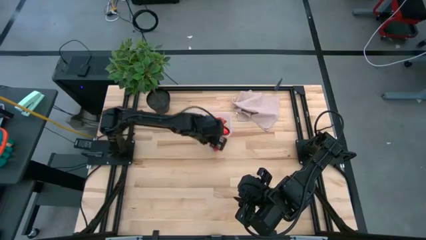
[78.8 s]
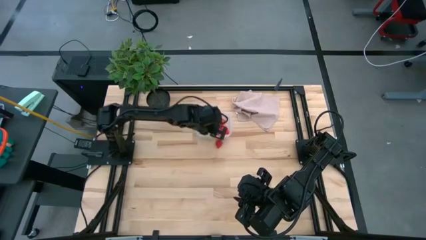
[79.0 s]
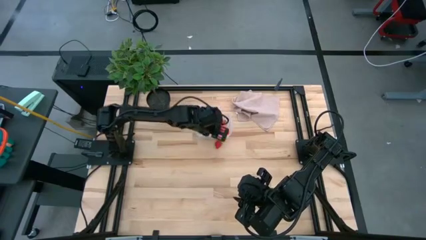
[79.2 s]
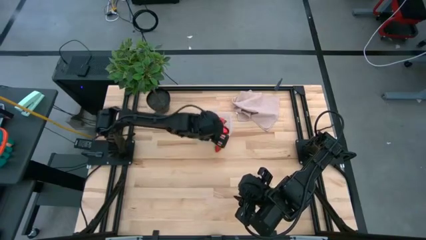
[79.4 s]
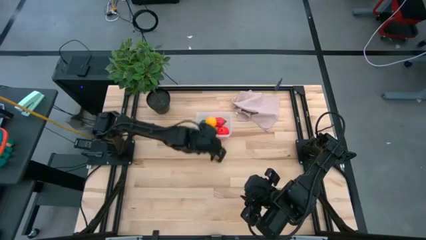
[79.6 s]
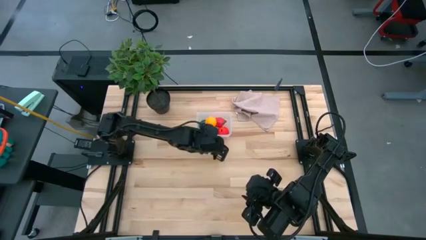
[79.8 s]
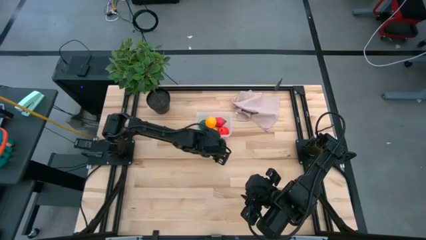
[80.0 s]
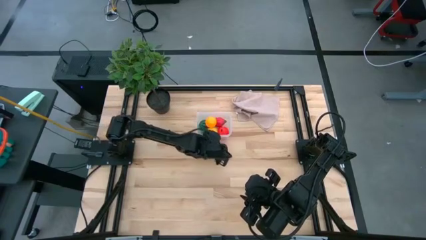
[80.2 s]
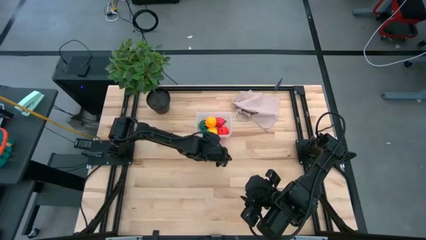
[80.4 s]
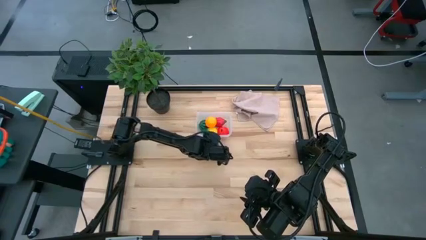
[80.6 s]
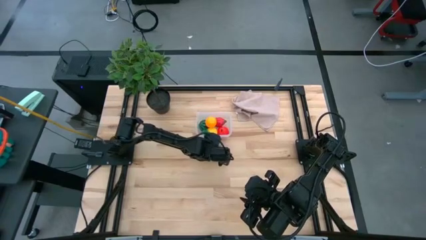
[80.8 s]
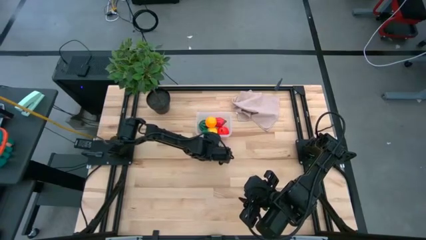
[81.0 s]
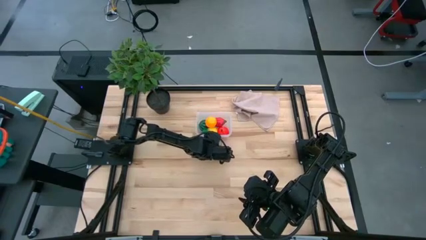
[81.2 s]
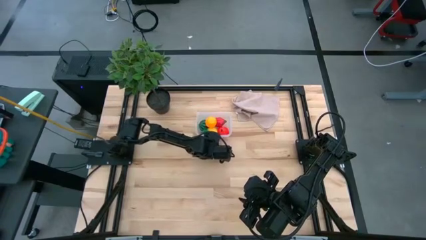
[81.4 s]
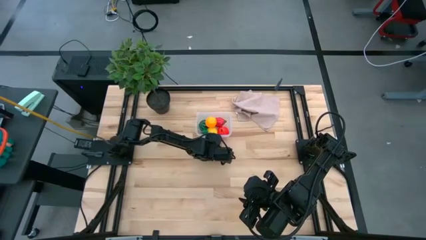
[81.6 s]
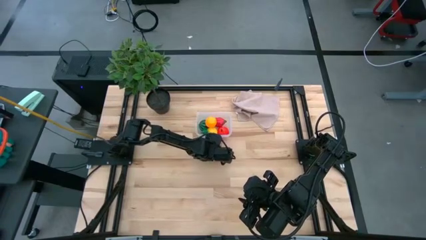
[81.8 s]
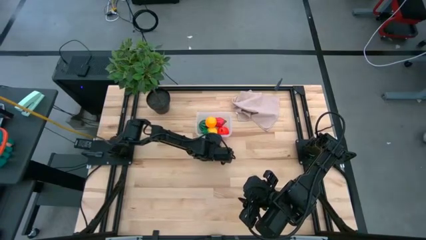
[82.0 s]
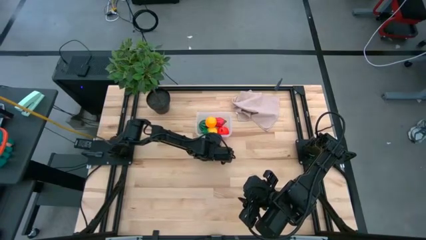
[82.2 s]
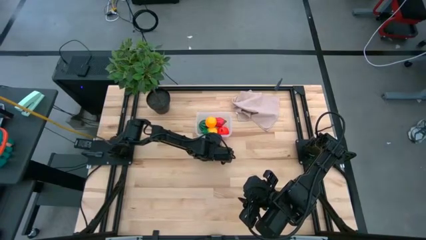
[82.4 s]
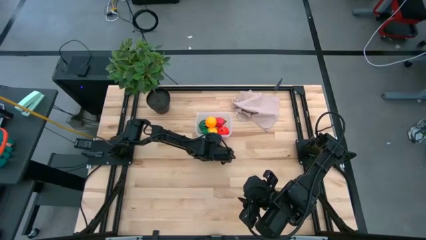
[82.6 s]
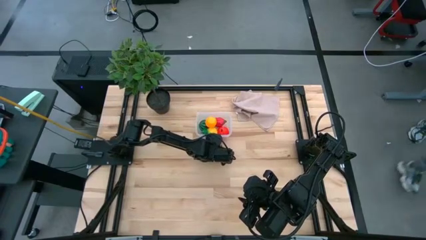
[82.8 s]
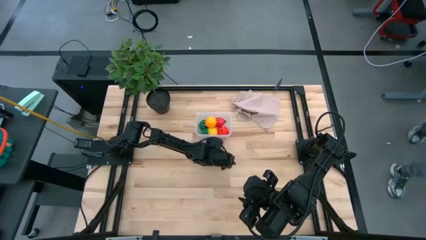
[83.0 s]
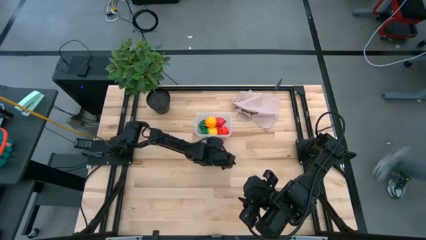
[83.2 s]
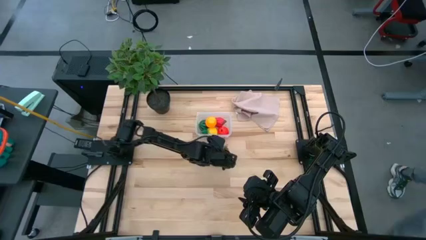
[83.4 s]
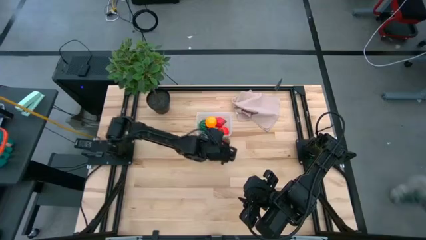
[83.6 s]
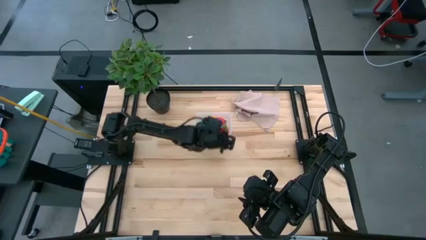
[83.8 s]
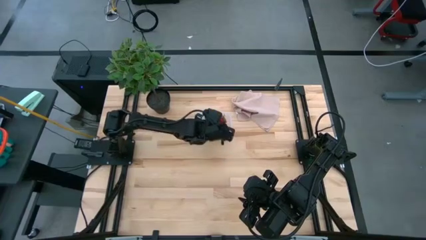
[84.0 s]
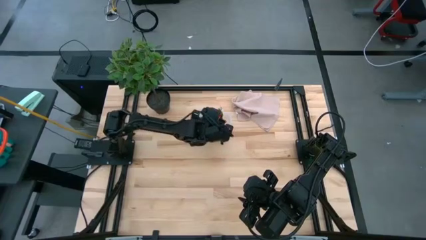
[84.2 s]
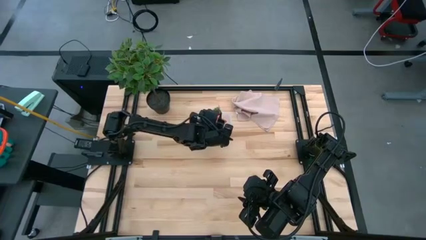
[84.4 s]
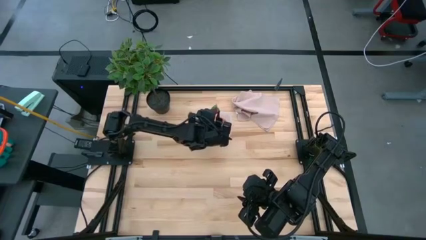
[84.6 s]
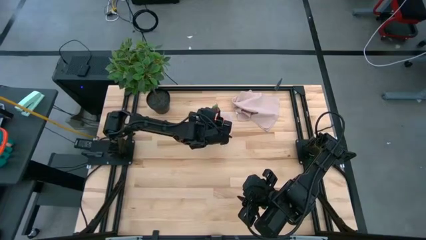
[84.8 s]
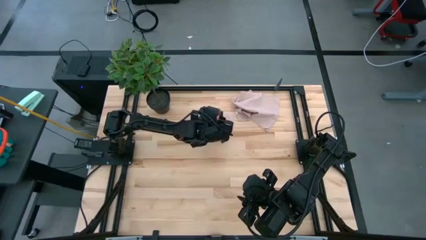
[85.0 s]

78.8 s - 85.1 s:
Task: Pick and placing Produce into tupperware
Put the red strawberry into the transparent container

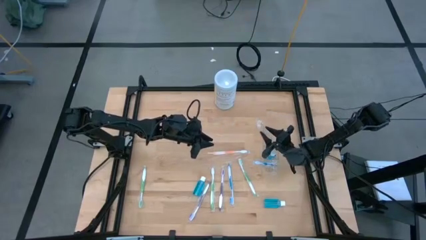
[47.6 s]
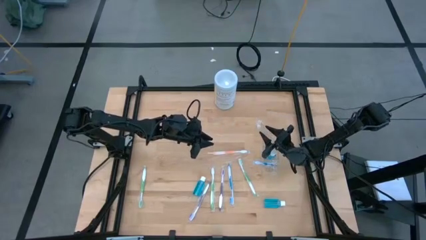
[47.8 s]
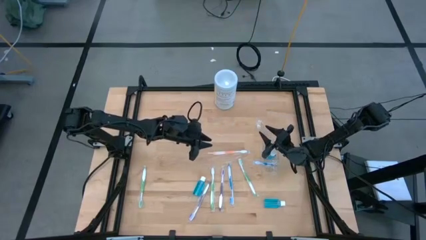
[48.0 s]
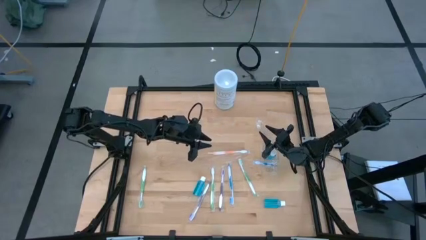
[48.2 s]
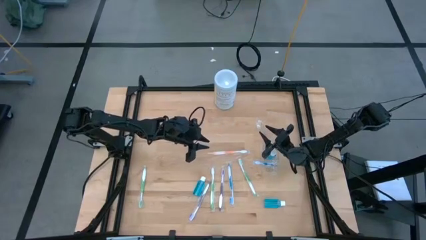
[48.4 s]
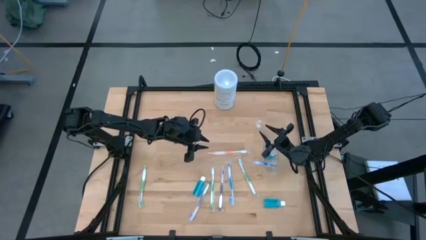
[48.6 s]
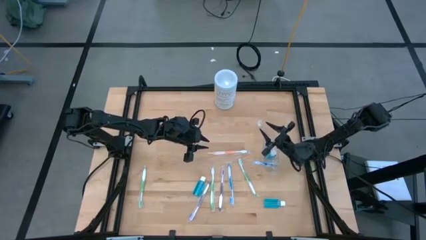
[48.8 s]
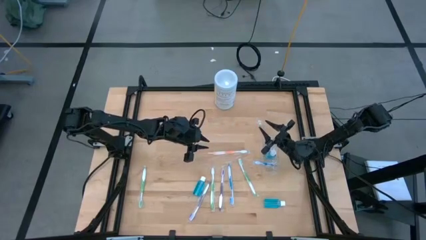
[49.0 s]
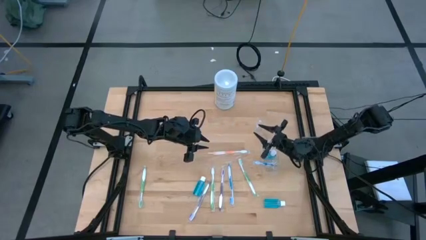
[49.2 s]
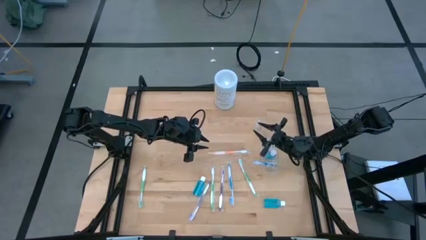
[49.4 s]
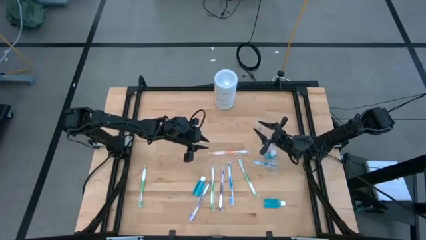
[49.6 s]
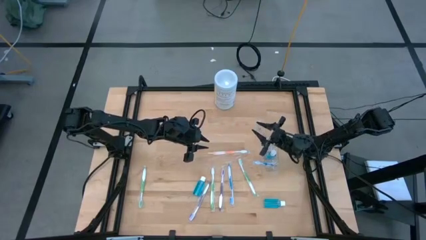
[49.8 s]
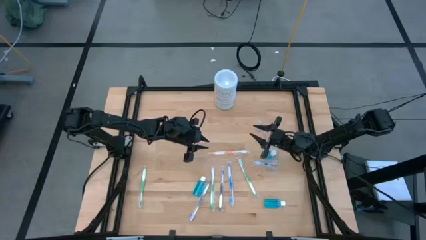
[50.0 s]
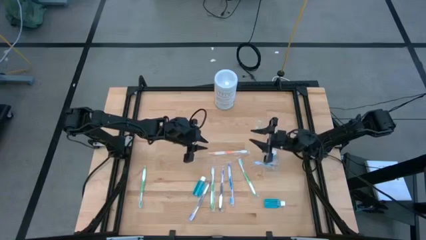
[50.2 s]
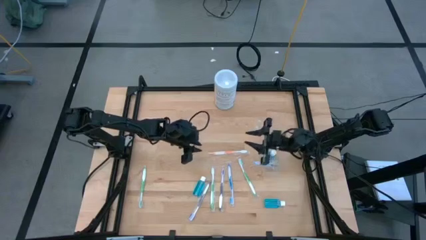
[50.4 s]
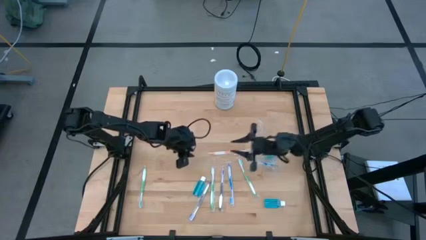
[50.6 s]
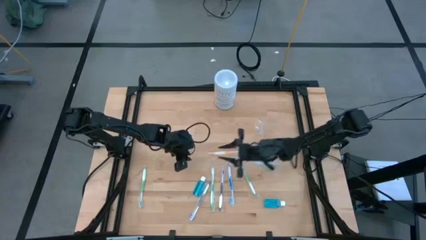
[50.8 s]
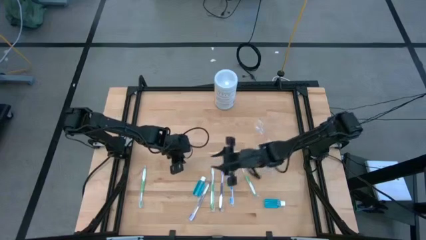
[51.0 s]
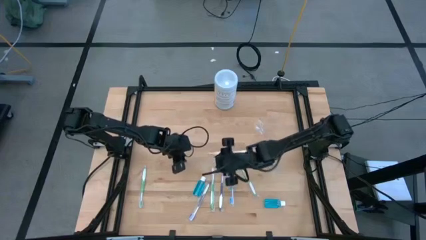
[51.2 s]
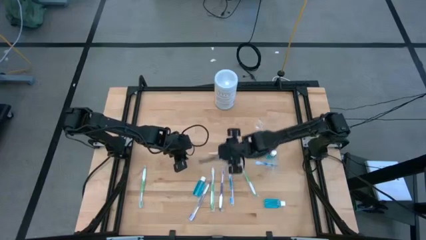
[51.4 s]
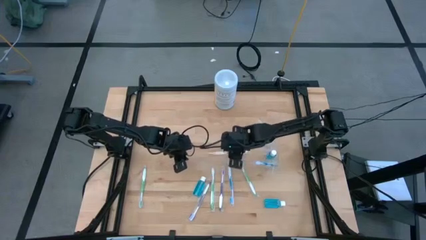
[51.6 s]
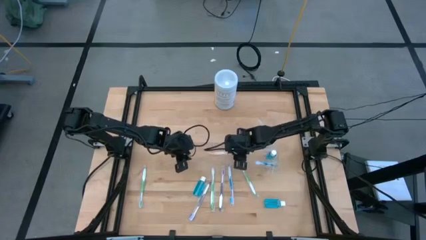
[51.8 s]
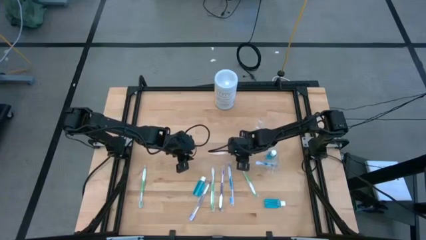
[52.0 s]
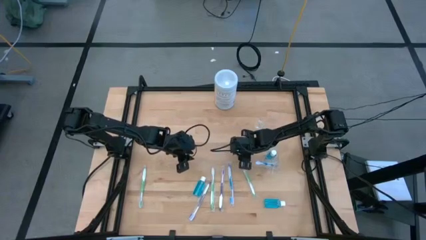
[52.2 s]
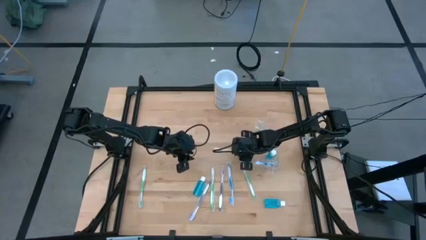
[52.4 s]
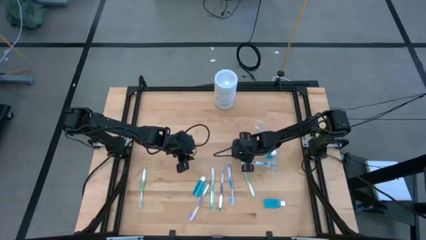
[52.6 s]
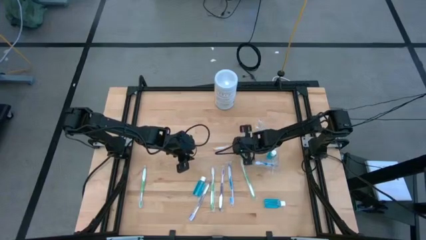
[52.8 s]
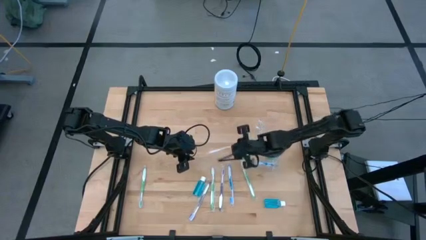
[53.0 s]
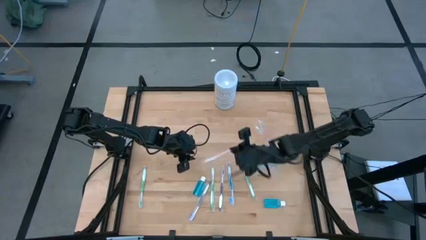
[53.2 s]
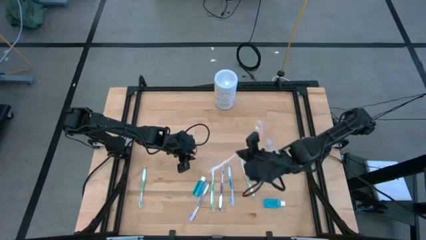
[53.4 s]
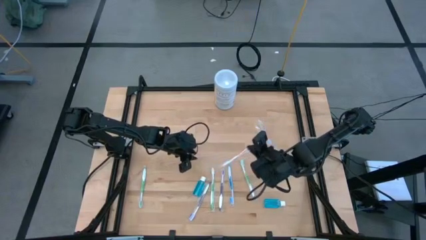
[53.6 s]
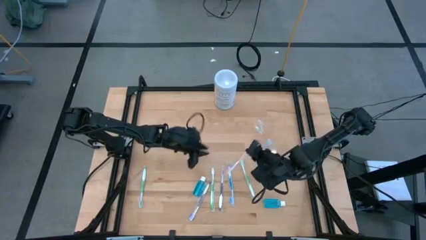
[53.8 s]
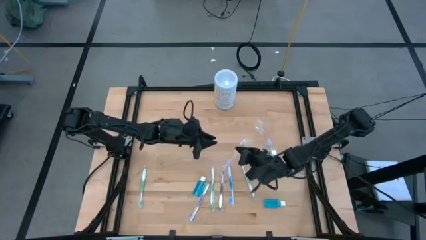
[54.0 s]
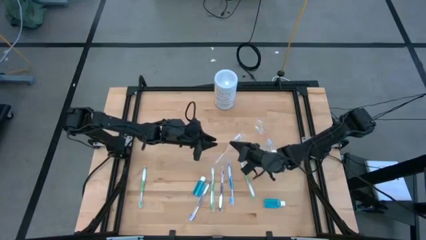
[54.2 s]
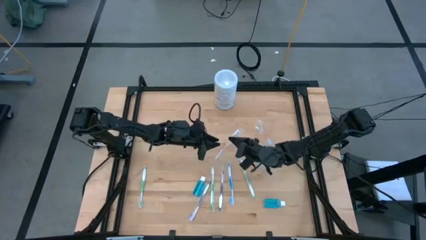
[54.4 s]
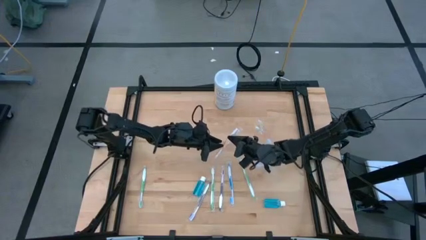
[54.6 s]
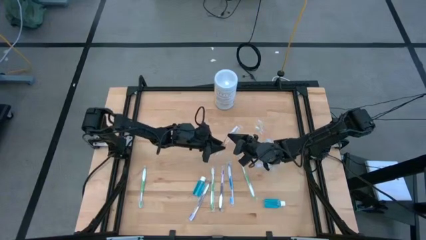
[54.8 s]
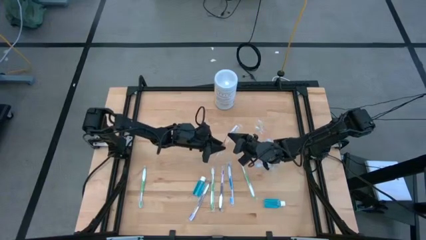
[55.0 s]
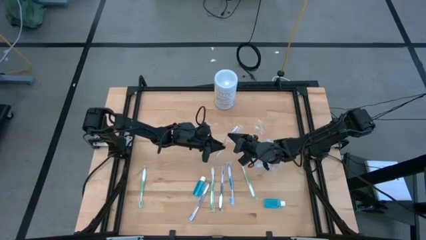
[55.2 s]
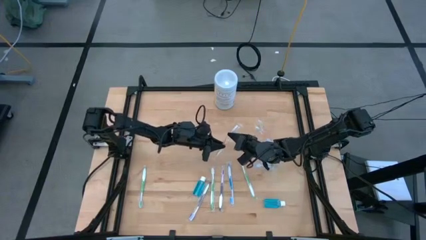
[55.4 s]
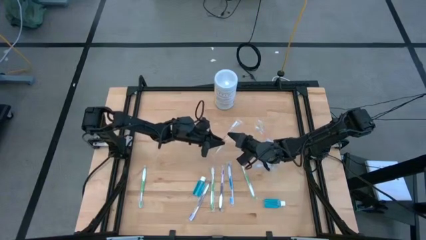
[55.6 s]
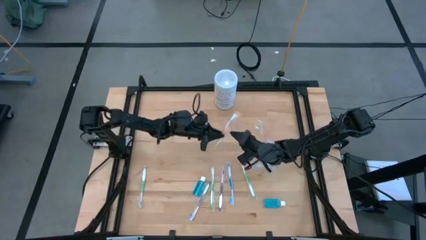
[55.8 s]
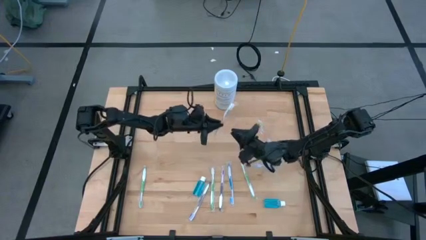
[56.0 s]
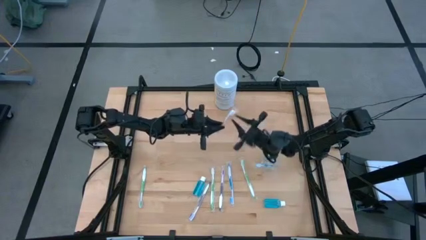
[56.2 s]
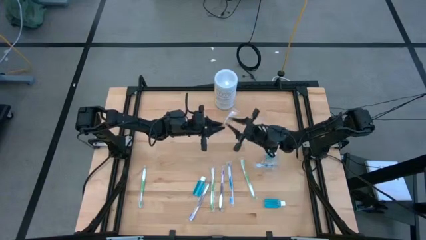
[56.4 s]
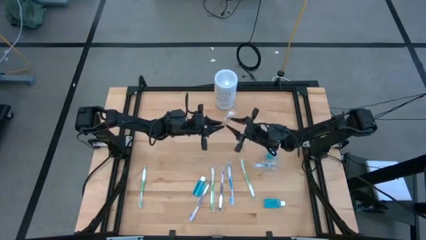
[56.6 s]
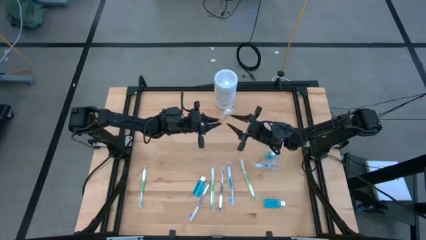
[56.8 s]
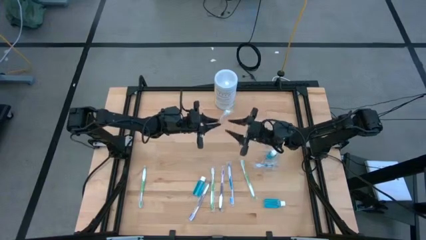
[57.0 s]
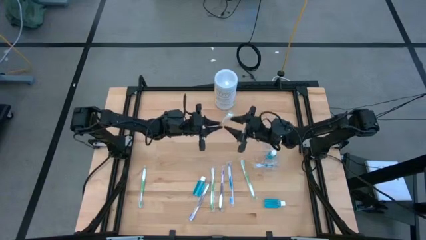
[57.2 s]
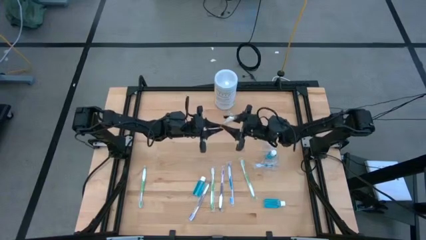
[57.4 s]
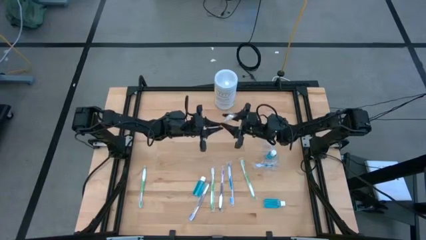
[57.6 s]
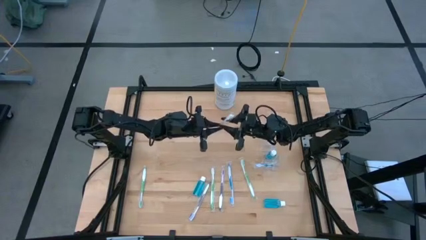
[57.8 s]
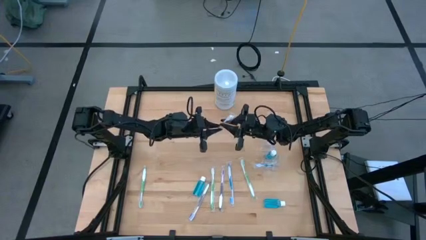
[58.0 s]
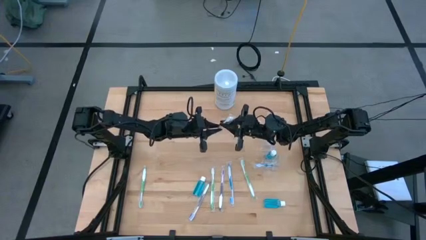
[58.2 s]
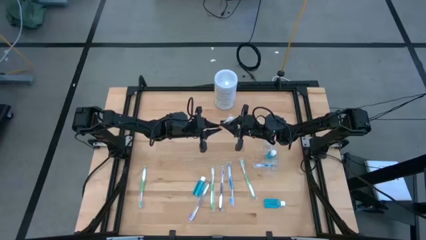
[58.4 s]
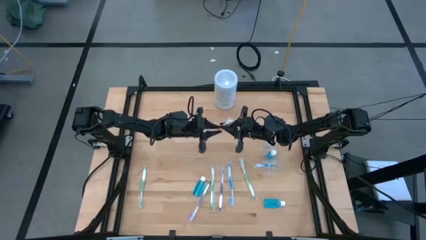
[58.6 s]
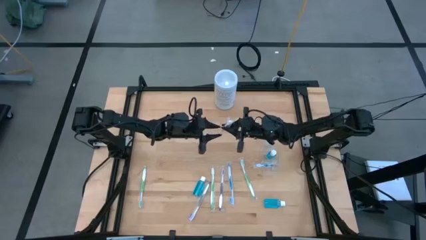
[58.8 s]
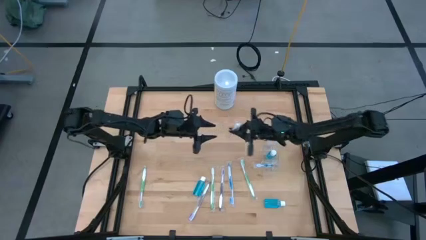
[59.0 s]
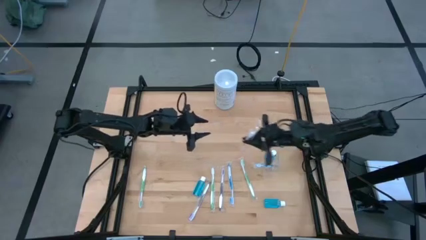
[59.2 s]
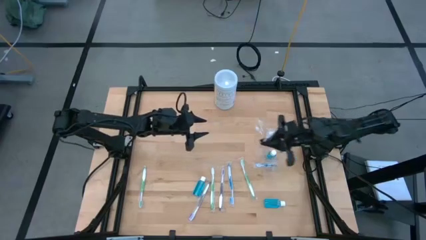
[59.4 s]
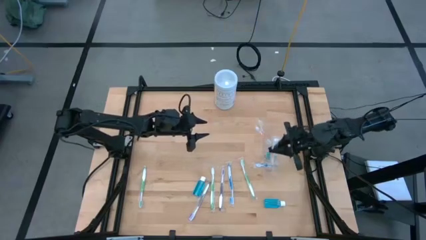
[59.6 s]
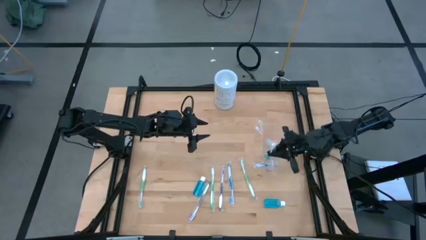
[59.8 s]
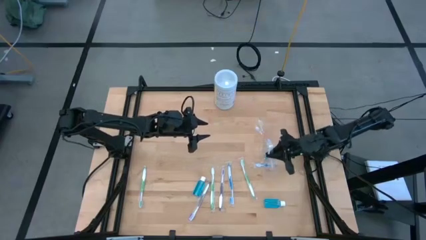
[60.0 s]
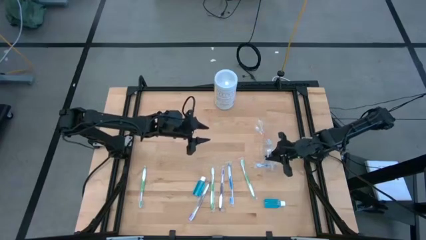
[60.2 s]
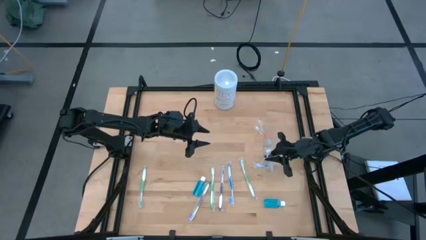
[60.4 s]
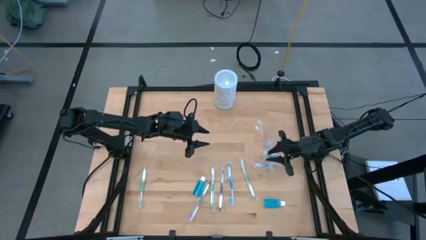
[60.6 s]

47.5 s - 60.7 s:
Task: Pick & Place toothbrushing station
Put the orange toothbrush into the transparent organizer
